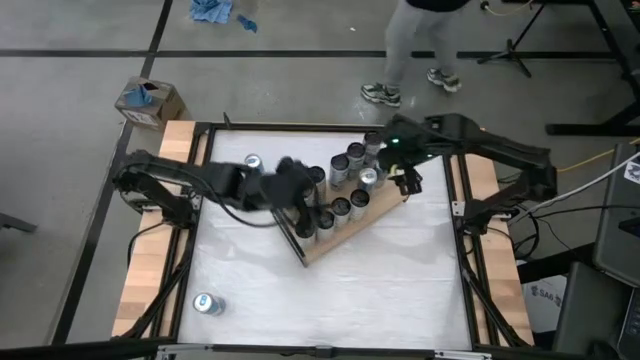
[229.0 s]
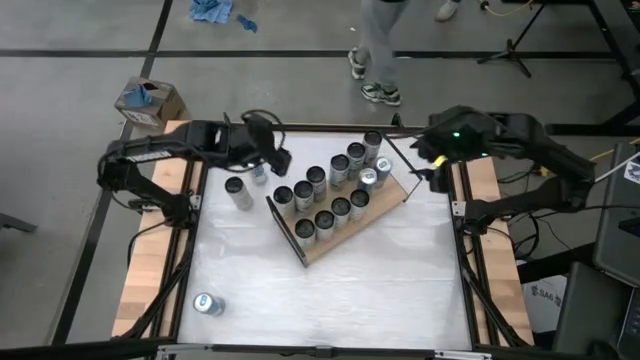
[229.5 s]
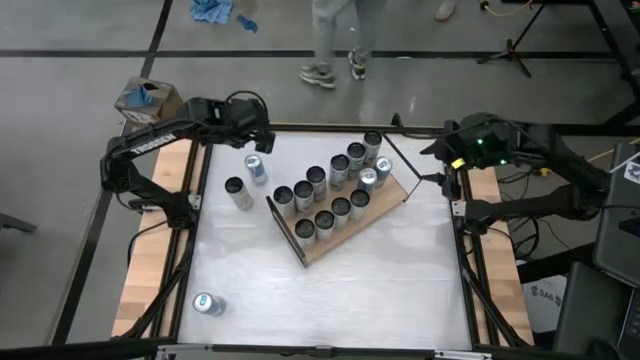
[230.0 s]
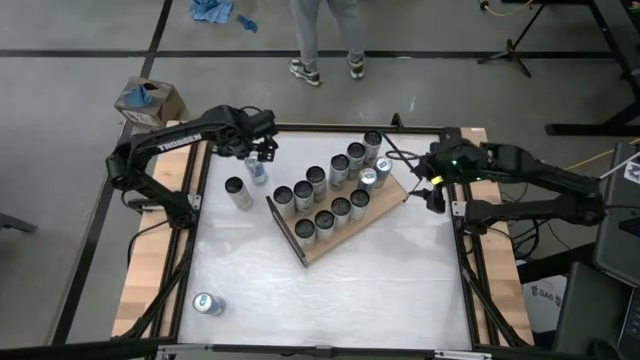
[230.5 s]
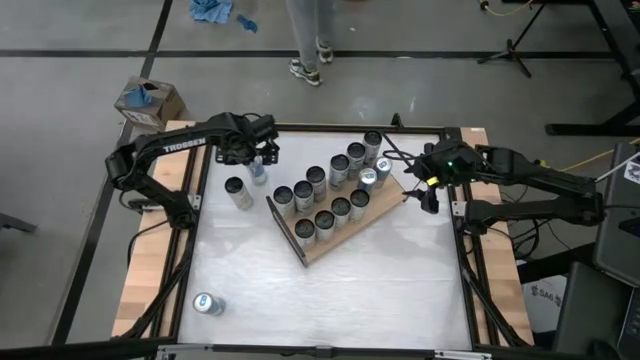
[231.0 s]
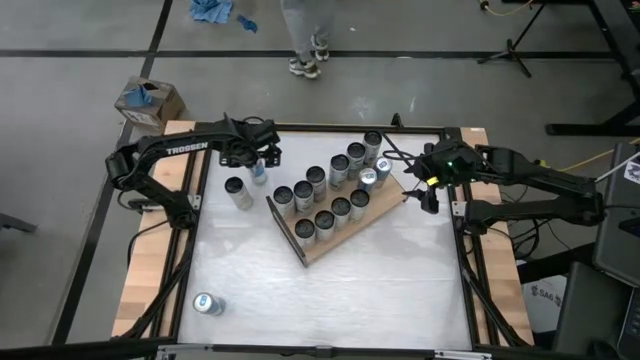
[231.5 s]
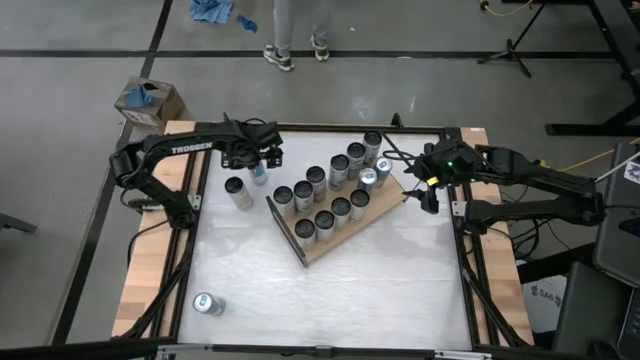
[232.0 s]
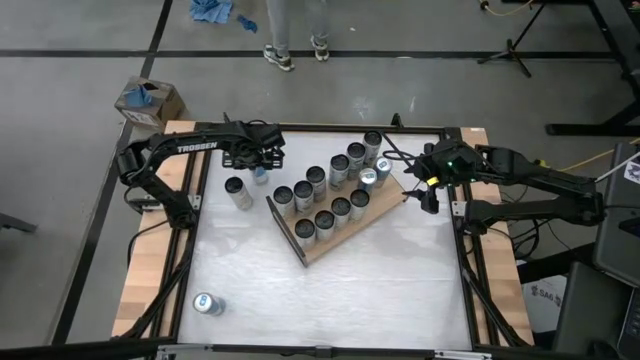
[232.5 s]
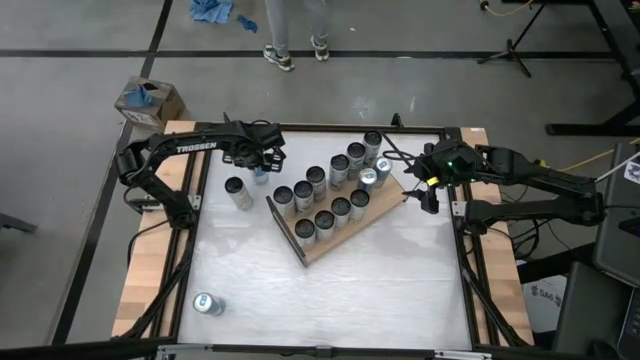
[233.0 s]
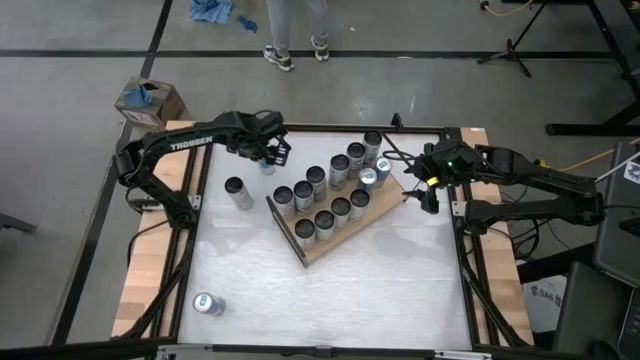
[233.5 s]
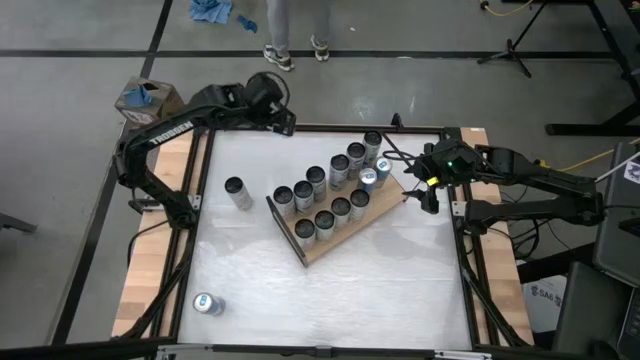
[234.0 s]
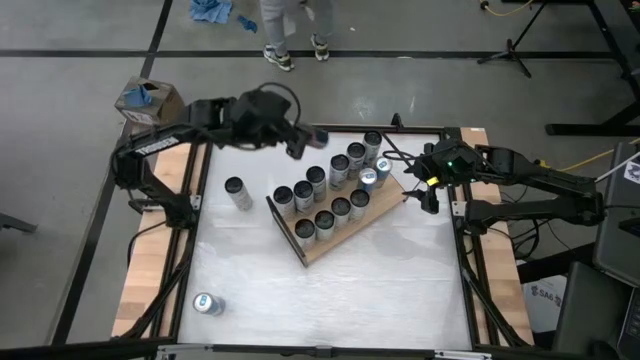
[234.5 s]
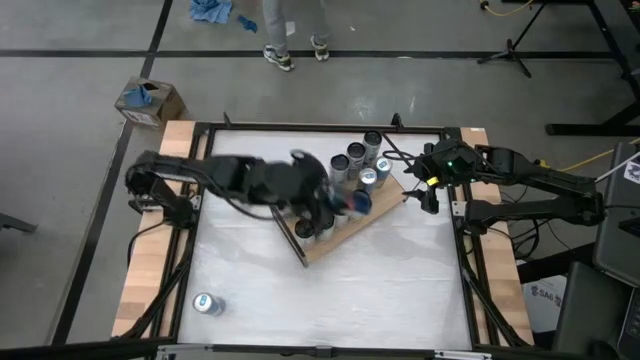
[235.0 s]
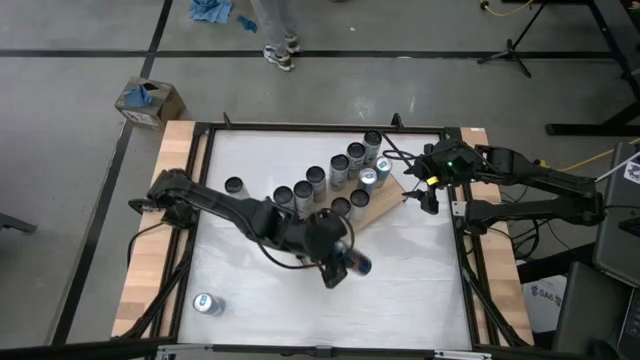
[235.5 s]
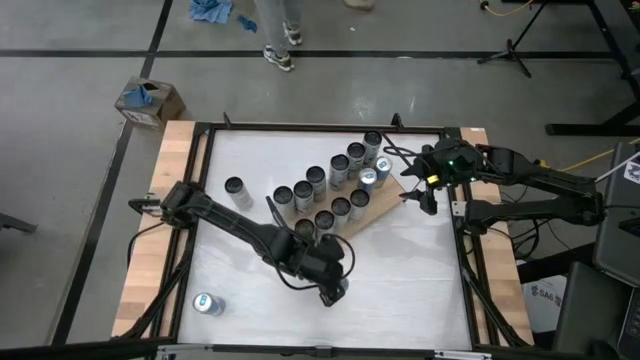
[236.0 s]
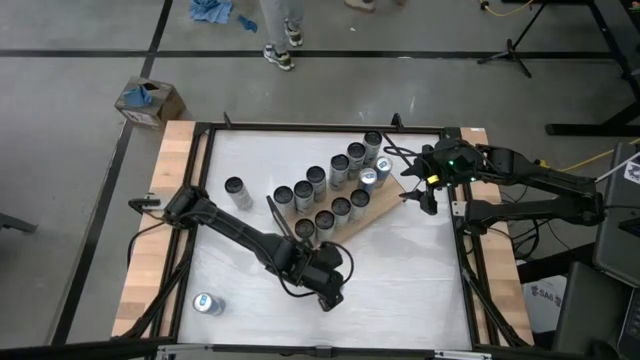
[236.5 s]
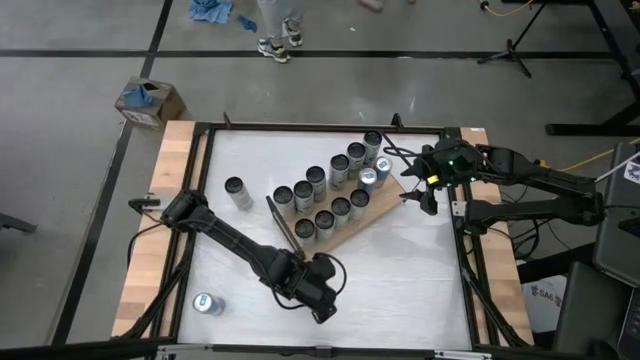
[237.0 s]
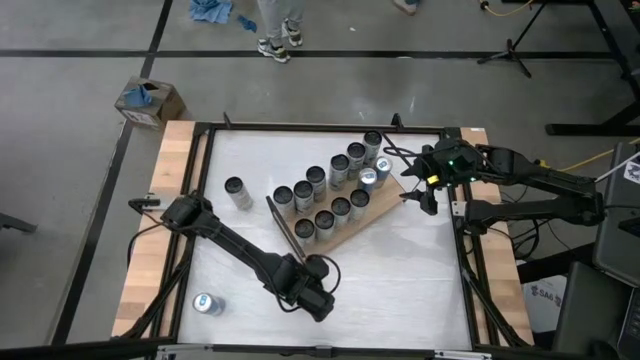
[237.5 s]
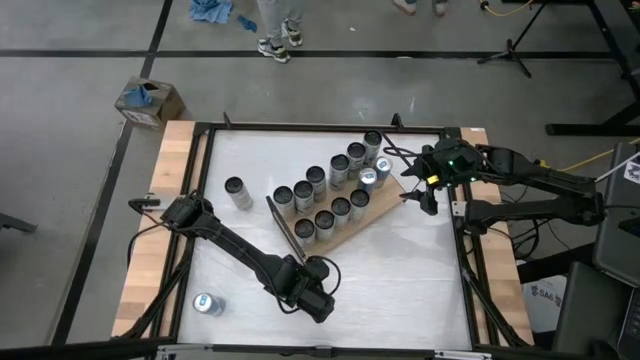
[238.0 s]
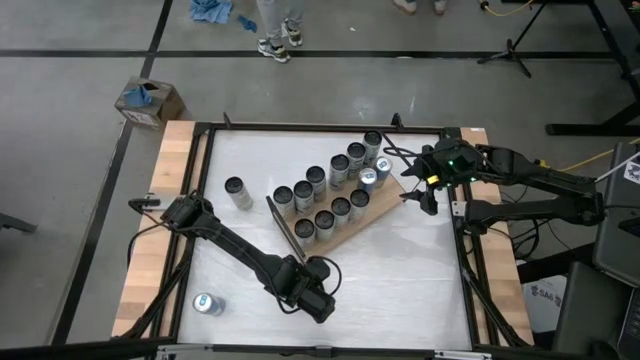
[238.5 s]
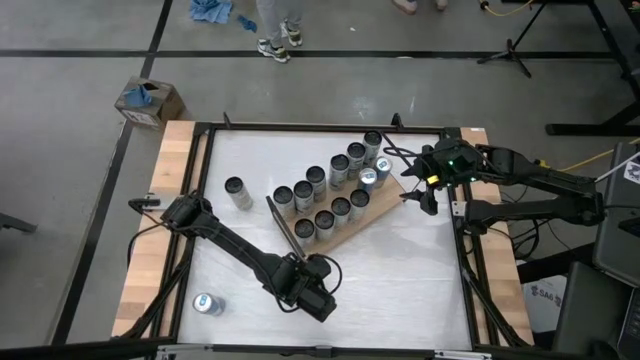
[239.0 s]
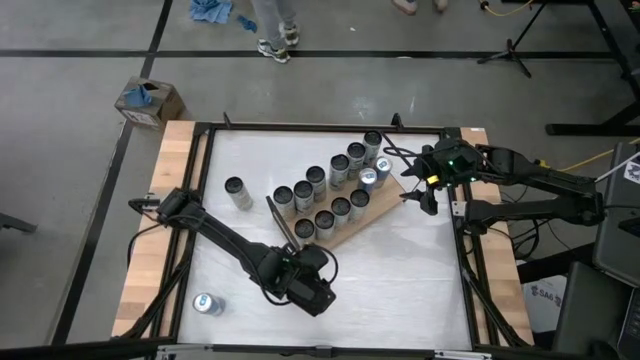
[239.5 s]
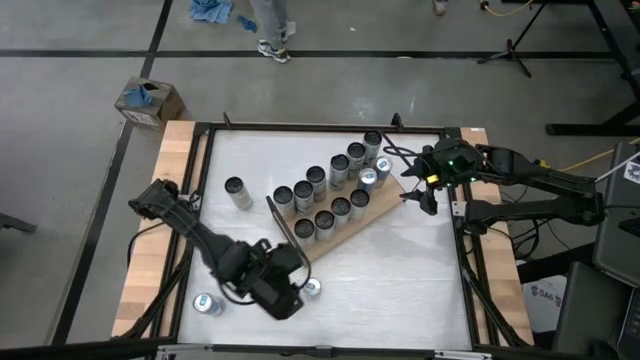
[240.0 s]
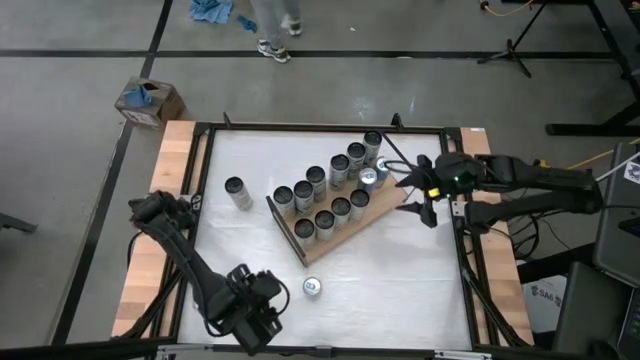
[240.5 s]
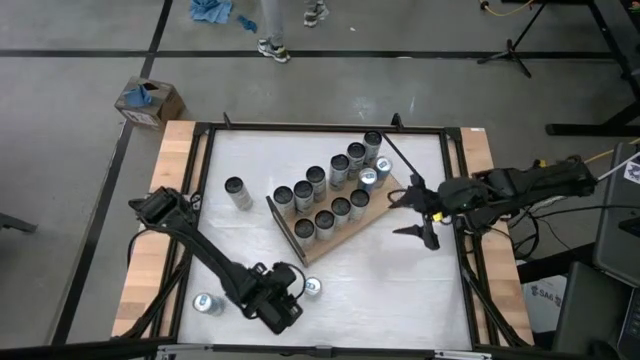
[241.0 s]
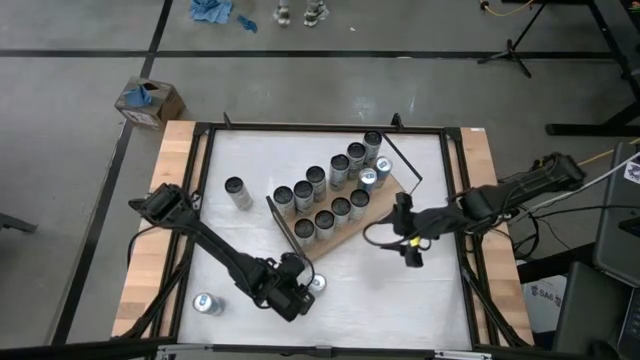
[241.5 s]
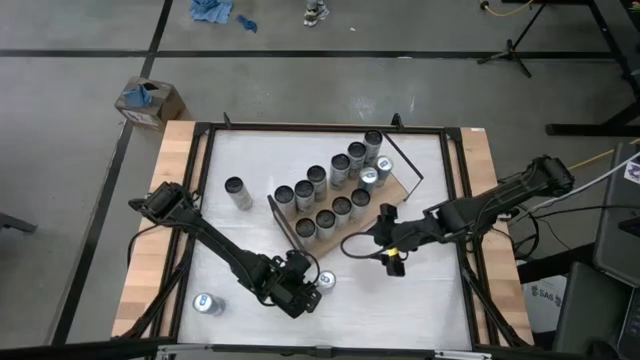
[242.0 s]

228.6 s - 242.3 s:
Task: Place canned beverage on shelf
Put the blue soda can on the shelf

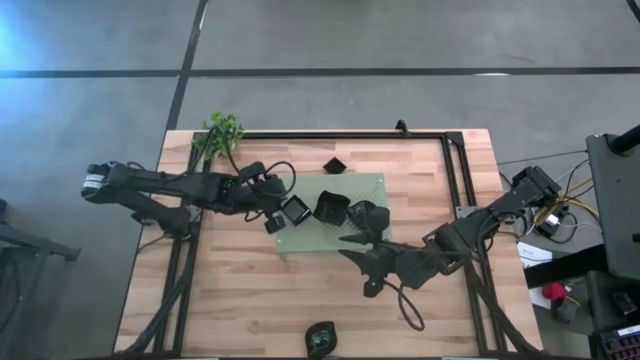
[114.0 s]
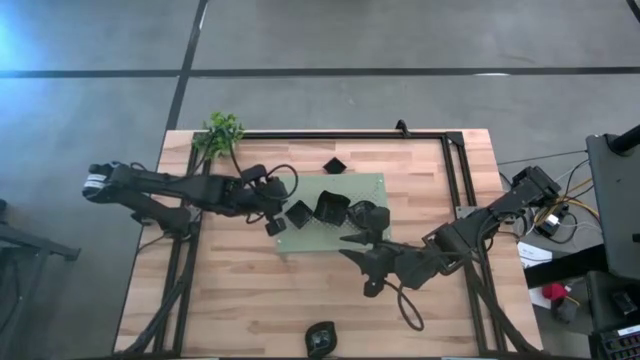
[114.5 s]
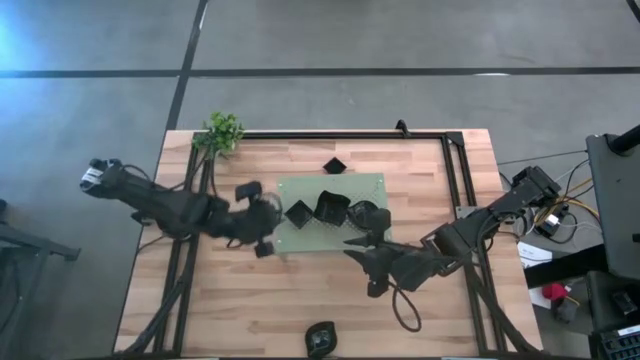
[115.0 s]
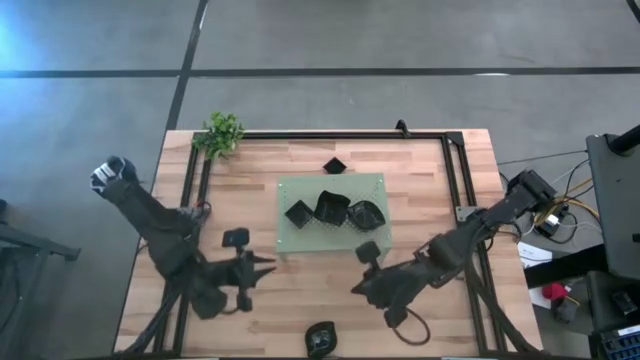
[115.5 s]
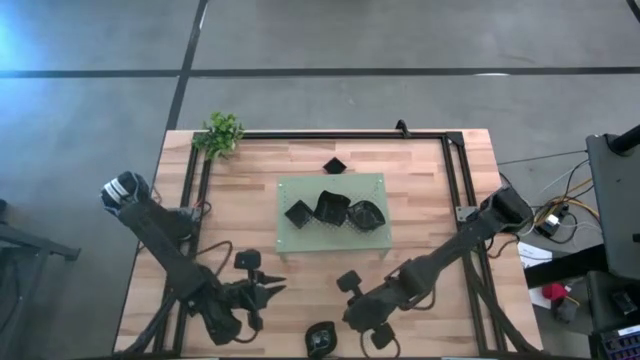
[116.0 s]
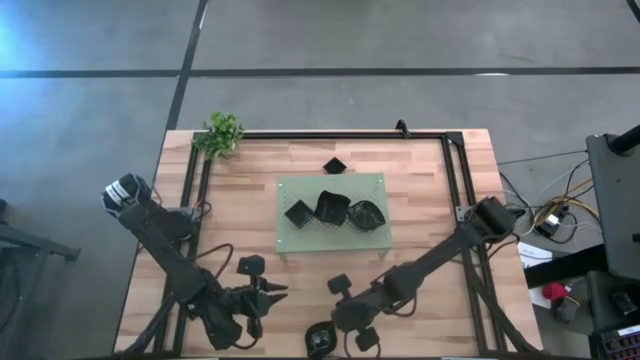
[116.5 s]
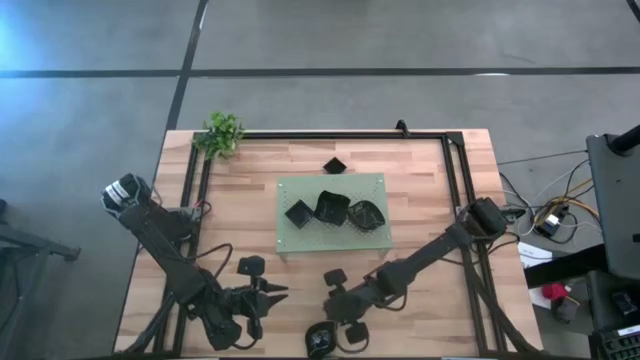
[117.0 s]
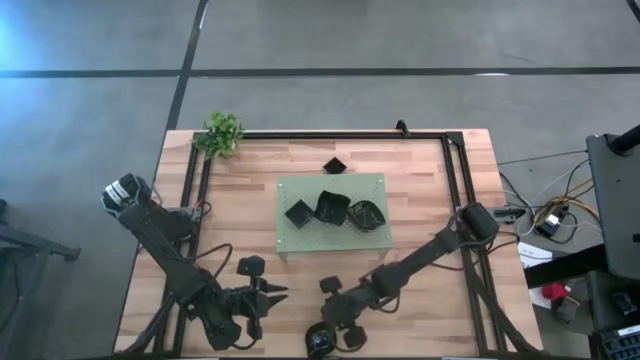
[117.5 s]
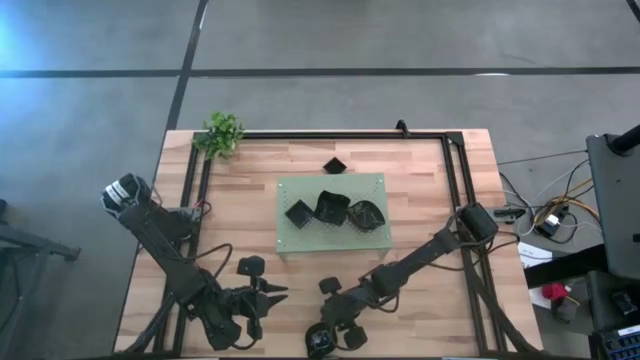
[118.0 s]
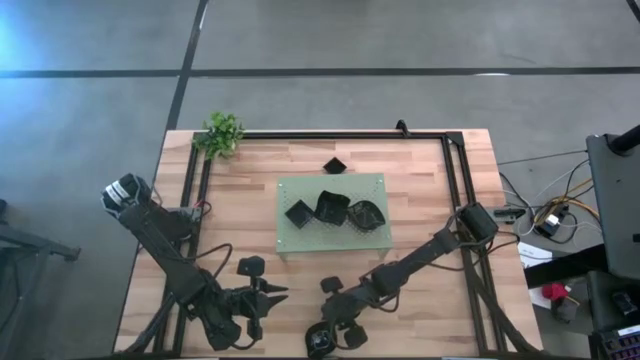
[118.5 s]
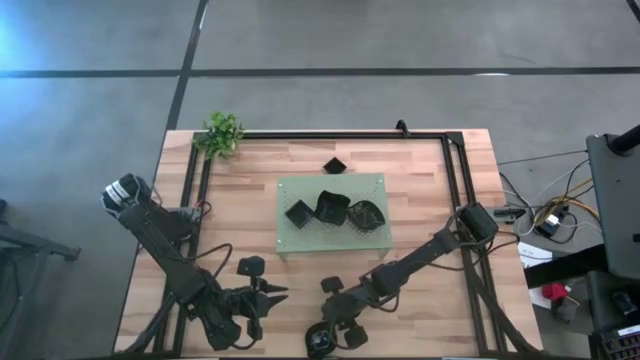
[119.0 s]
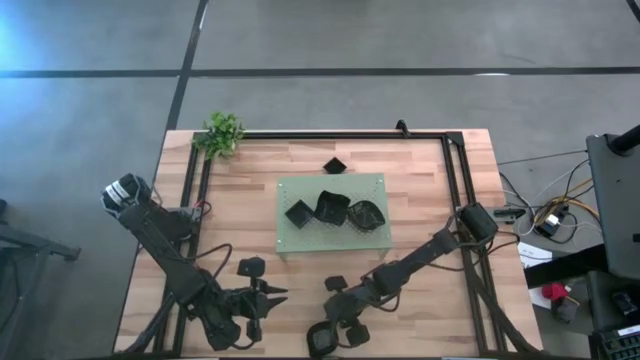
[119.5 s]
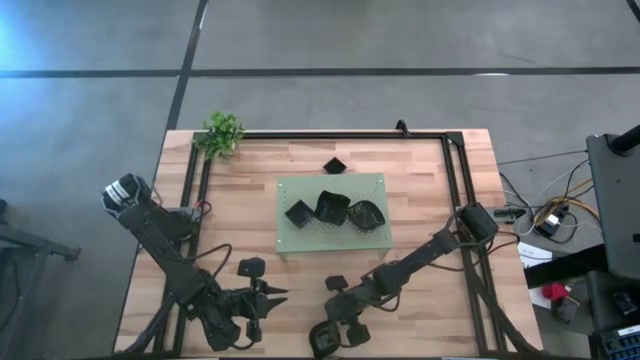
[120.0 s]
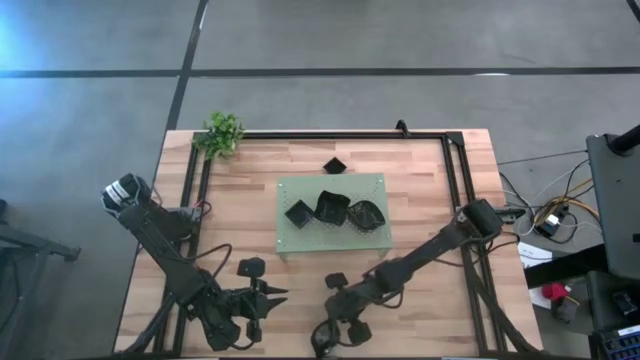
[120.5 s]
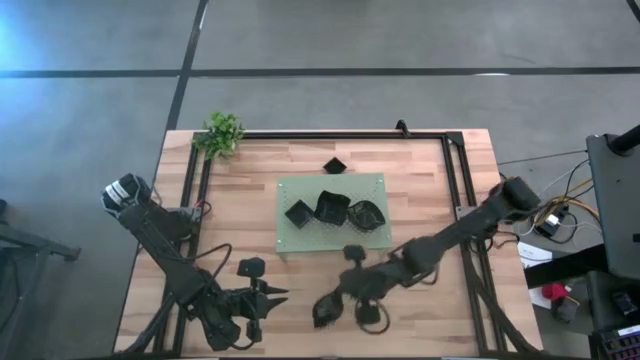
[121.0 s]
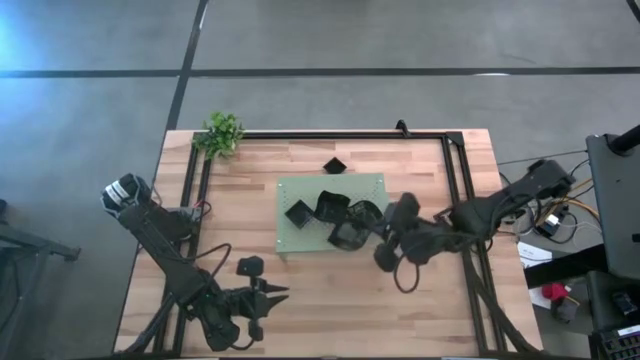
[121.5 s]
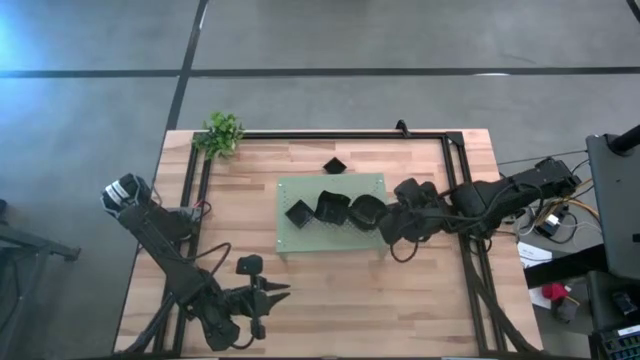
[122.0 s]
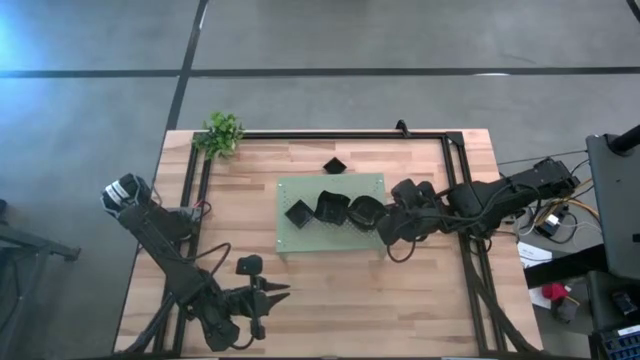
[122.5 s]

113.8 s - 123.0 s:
Task: Pick & Place Mini shaped plates
Stack the leaf shaped plate on top of the leaf shaped plates on the shelf
